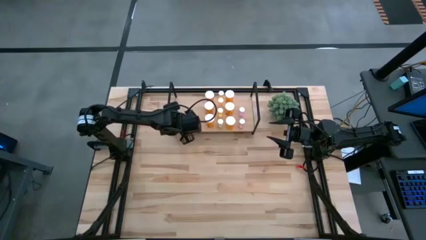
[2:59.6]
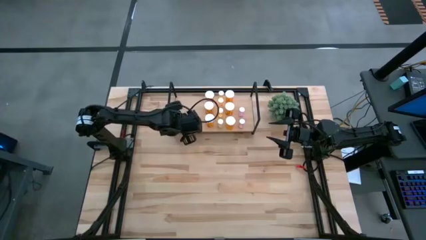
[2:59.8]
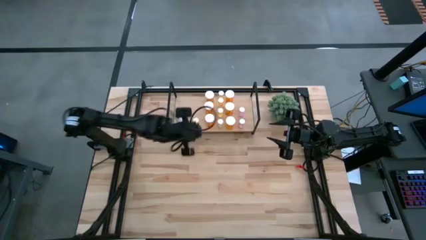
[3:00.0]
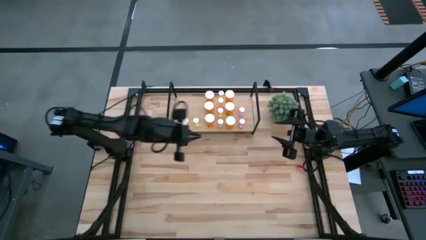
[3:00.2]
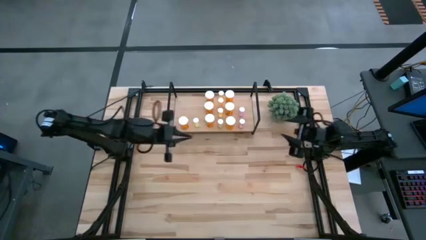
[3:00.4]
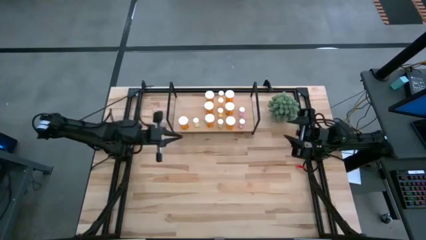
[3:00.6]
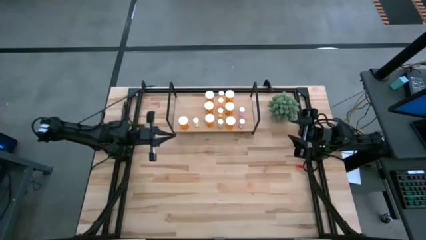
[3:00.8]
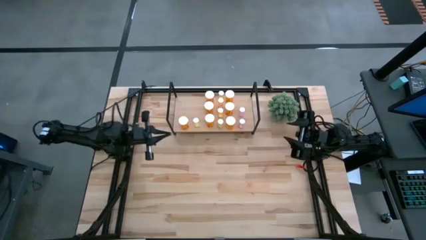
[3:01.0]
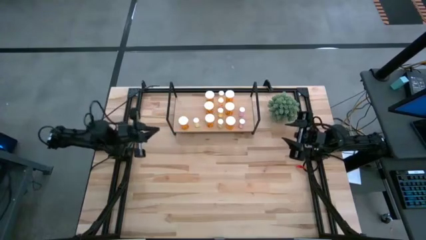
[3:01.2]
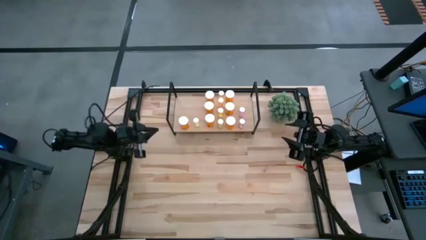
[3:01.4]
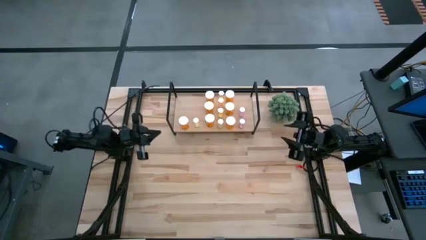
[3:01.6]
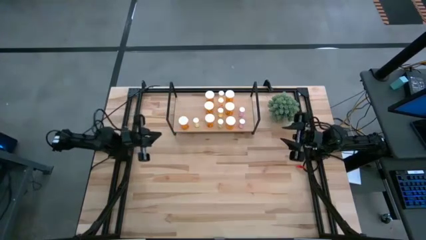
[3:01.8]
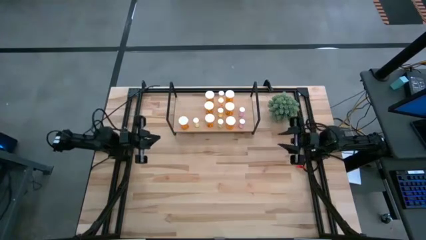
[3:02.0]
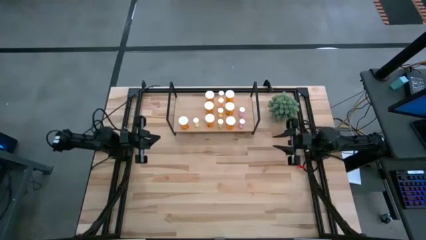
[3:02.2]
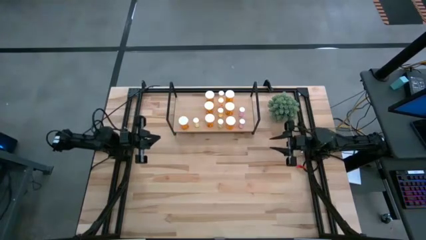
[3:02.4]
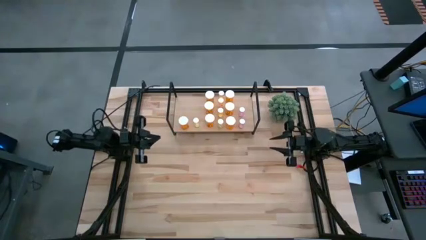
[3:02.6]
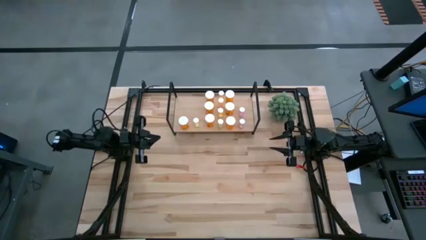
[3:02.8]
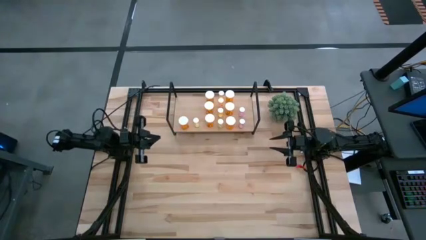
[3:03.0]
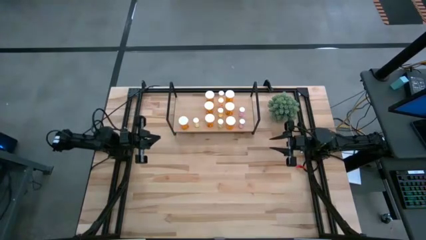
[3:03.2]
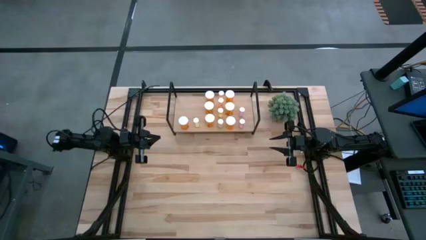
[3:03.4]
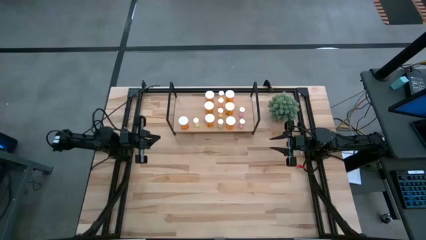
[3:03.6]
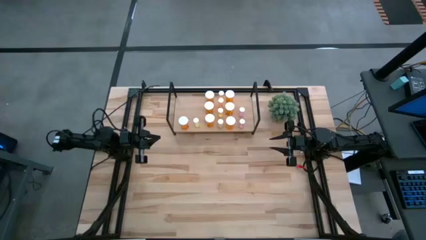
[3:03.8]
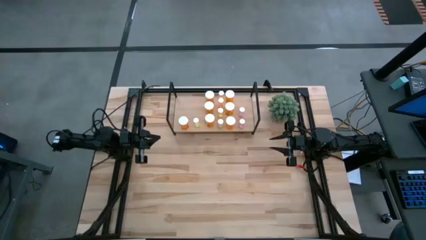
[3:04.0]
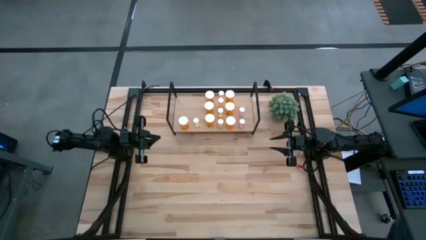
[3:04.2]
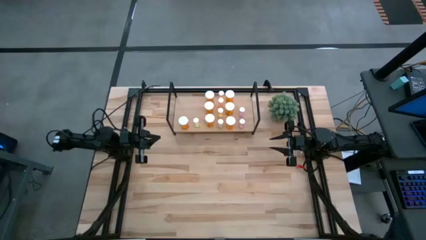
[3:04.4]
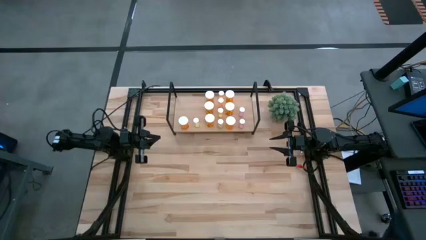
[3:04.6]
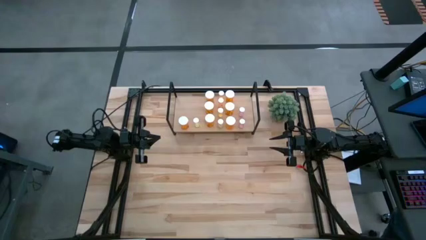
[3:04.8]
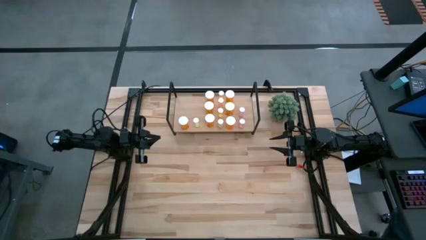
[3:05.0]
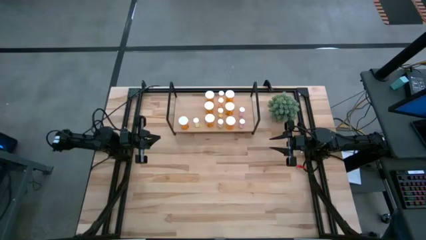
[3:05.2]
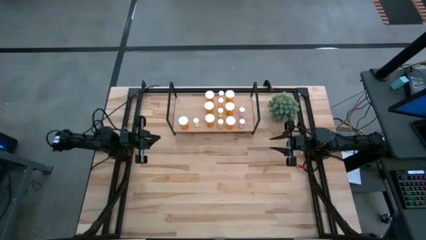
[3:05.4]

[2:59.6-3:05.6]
Task: Pick and place medicine bottles onto shelf by color
Return to Home Position

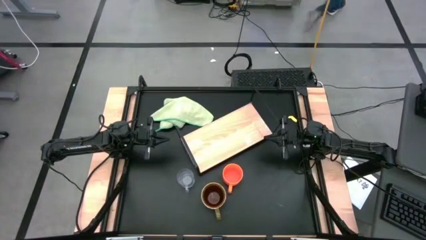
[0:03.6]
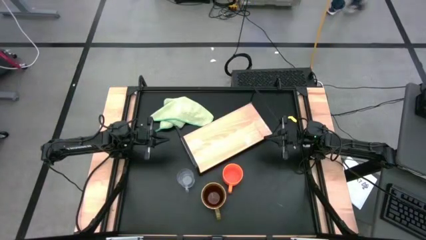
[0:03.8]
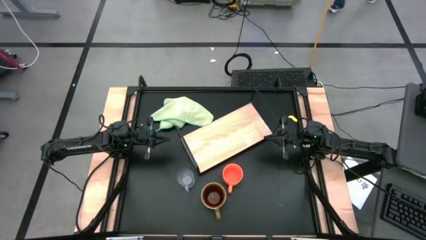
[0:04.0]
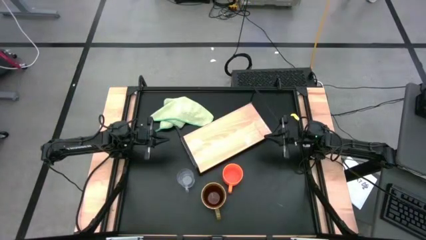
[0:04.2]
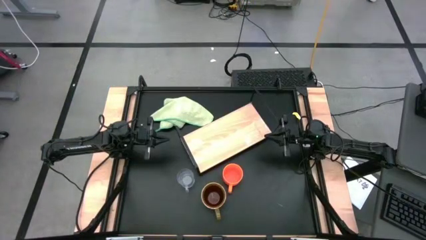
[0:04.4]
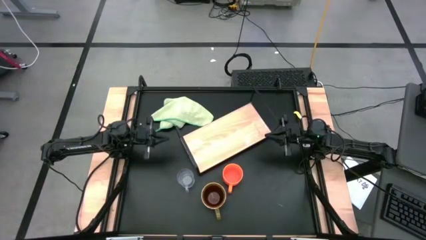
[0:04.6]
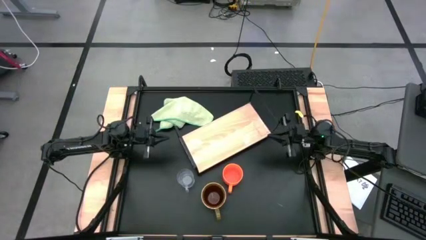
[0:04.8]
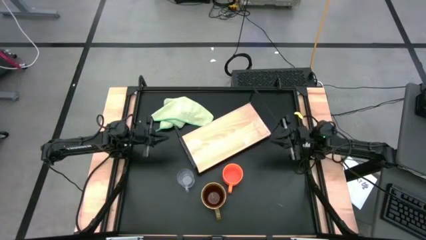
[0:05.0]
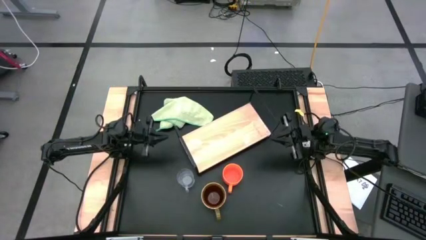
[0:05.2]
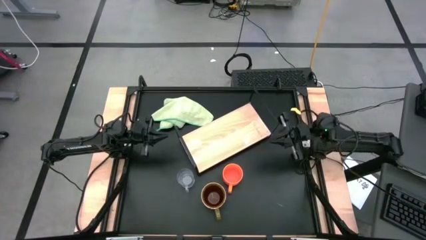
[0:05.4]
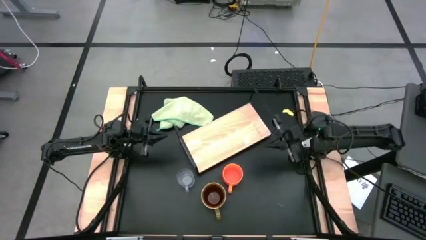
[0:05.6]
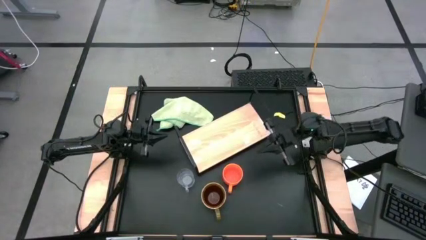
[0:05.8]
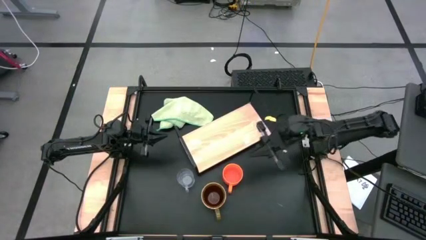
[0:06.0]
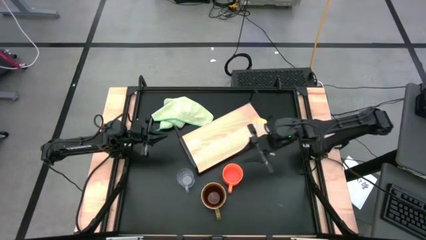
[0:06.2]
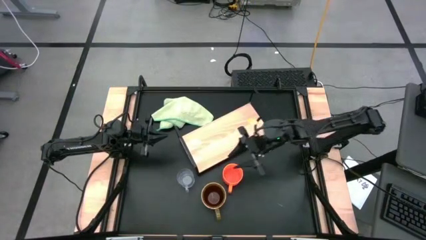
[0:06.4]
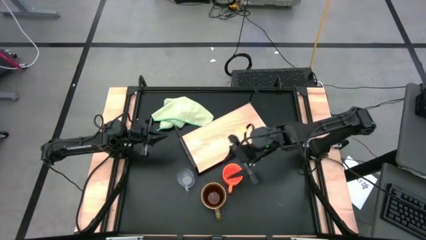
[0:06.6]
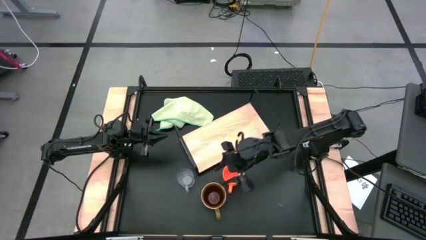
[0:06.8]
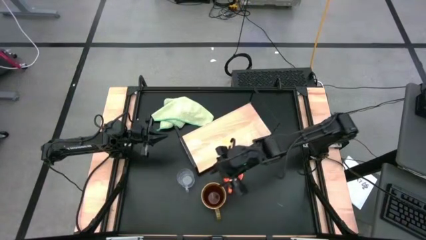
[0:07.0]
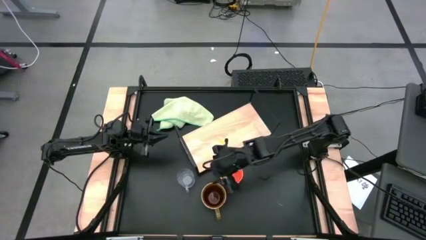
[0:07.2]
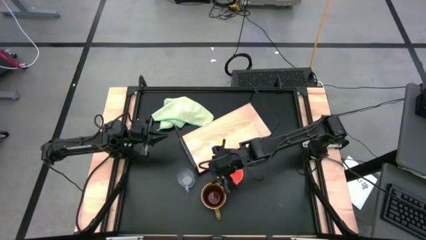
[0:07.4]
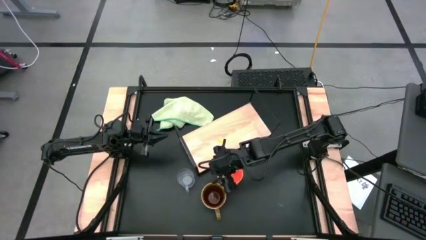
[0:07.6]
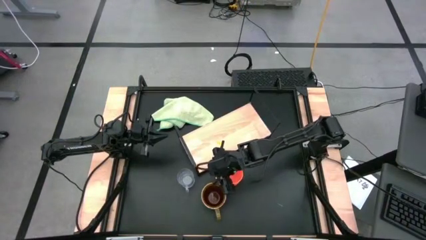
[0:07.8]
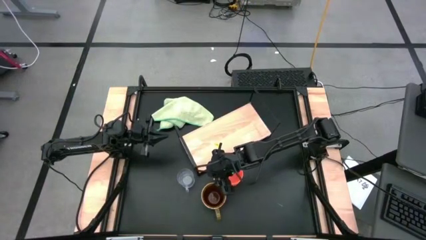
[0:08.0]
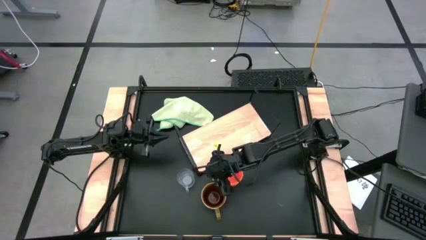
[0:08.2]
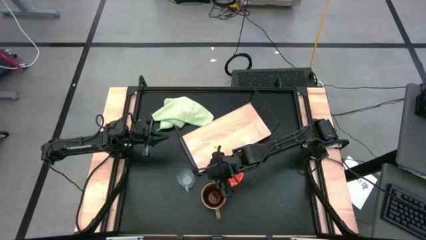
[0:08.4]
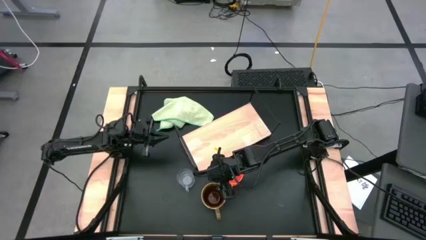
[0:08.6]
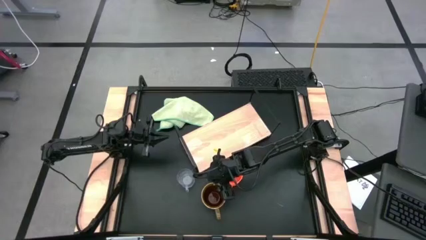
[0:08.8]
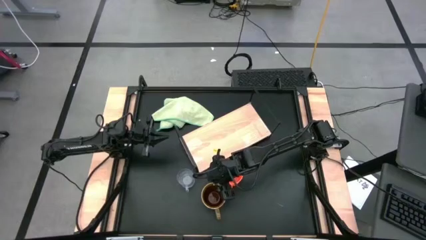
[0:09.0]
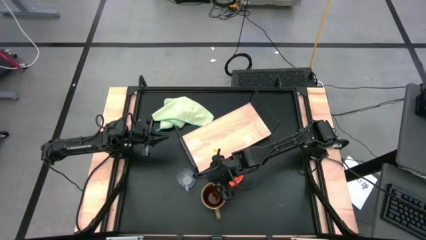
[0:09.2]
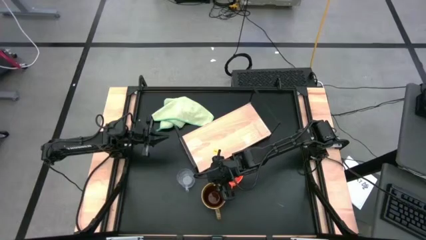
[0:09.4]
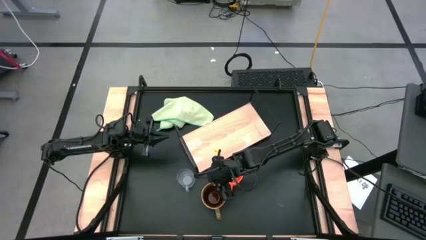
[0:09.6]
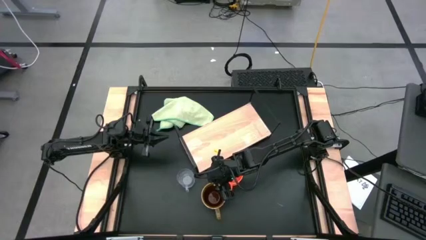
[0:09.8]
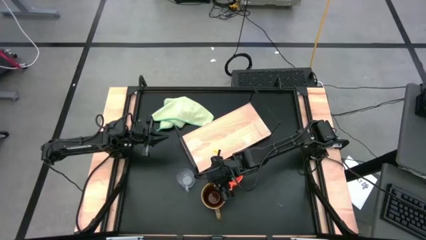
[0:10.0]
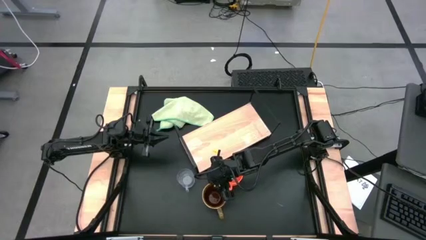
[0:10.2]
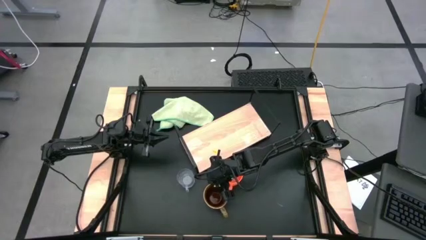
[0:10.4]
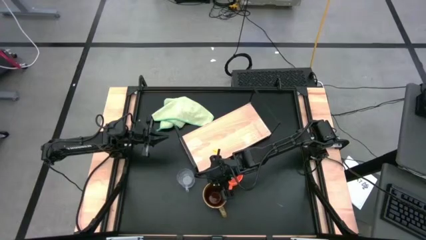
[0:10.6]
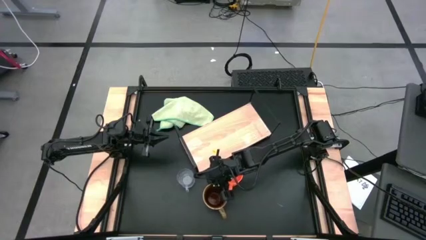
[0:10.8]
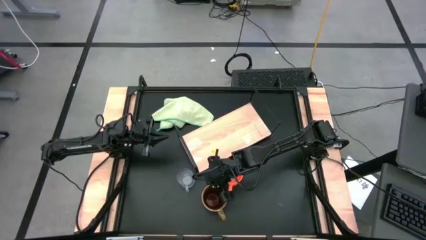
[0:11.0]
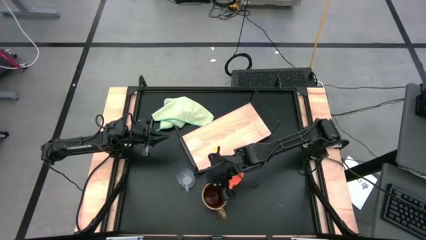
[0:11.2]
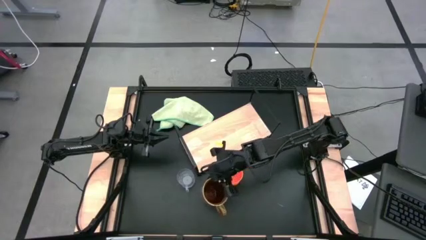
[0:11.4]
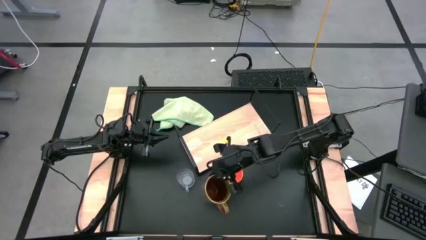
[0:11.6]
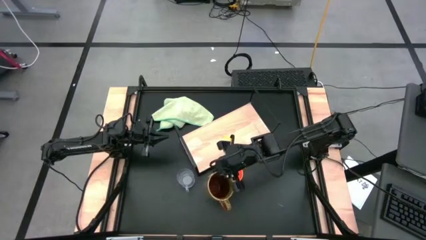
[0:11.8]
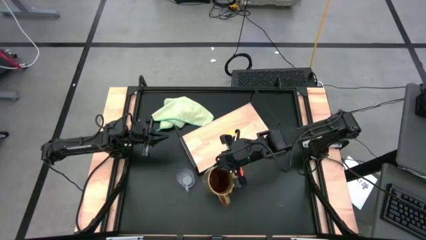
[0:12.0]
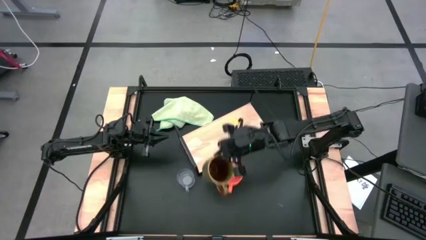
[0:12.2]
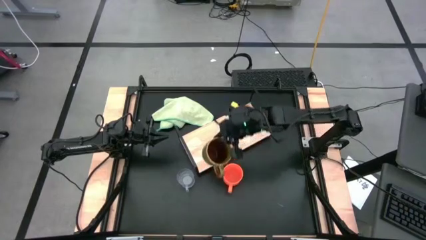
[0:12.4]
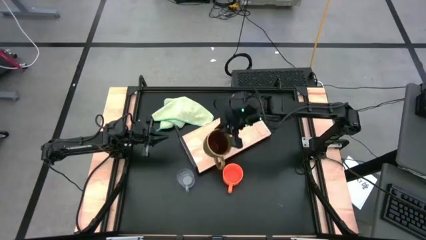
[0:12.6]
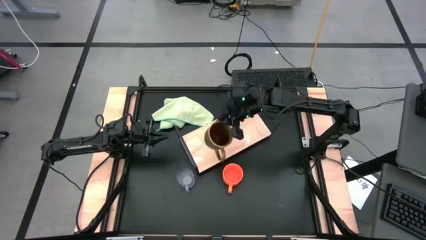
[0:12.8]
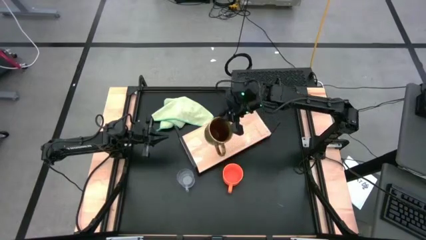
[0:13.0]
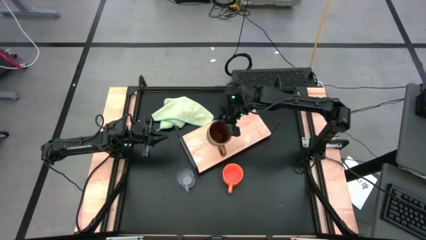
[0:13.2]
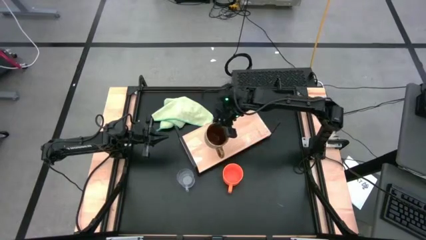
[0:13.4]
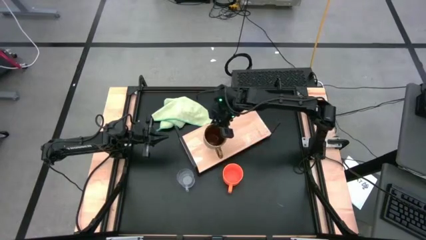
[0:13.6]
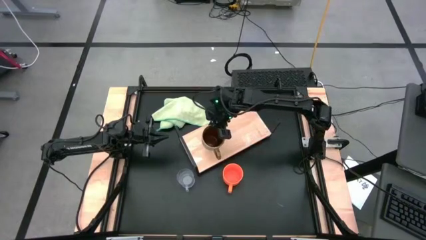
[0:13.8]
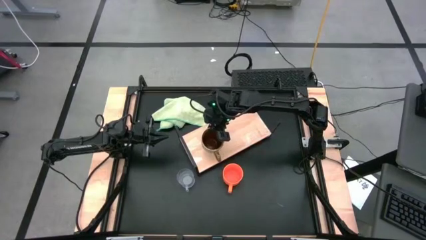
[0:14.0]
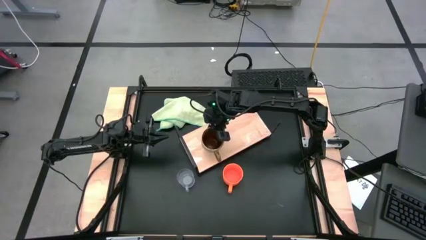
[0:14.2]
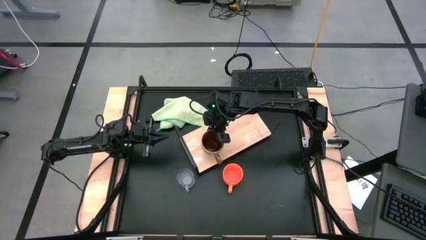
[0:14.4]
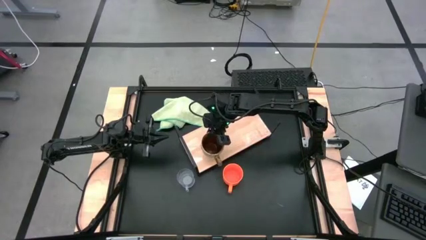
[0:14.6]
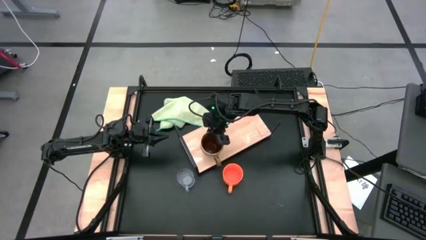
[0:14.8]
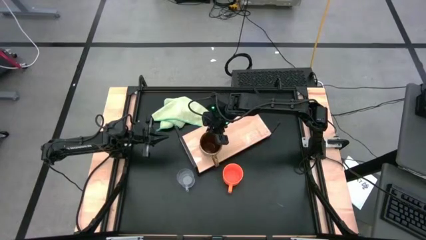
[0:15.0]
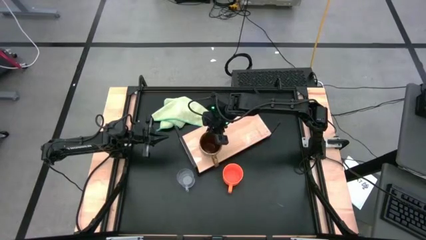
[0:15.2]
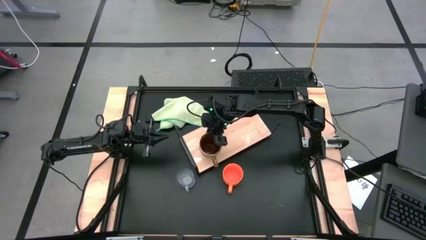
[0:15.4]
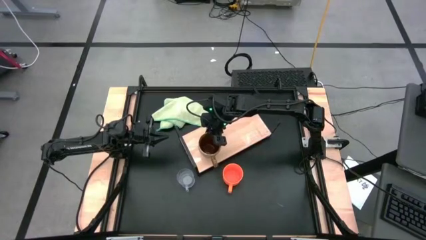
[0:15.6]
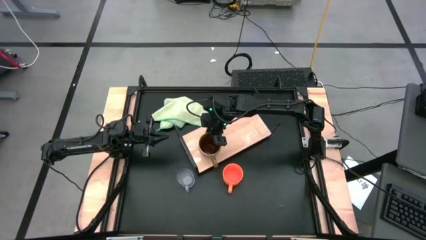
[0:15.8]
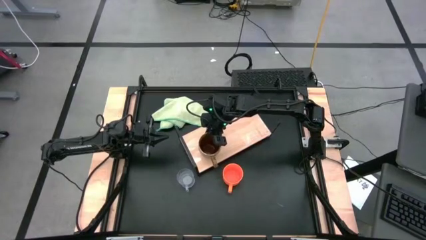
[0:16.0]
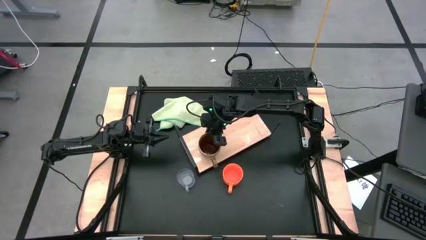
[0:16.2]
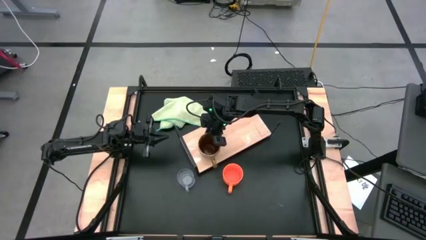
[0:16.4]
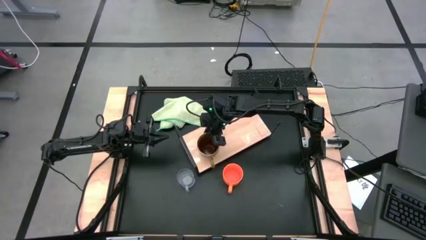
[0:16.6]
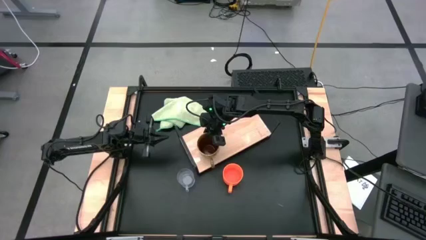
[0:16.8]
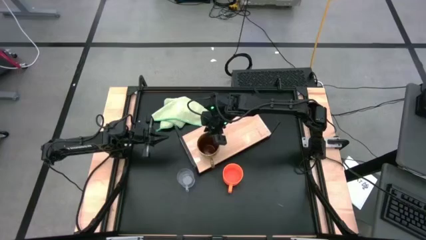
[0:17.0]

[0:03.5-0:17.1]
Task: Stack small to large cups/mugs on shelf
Put the dark green mug on the shelf
